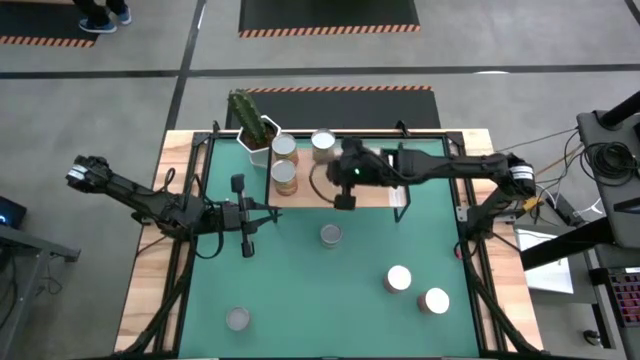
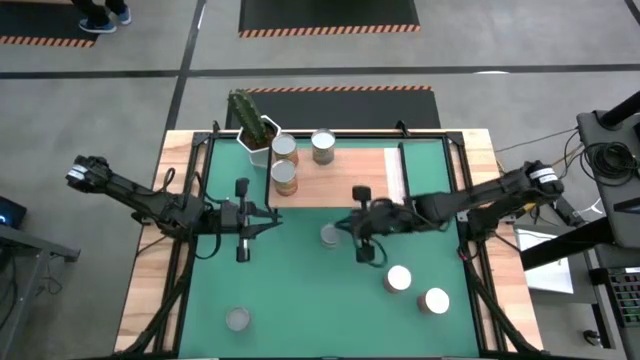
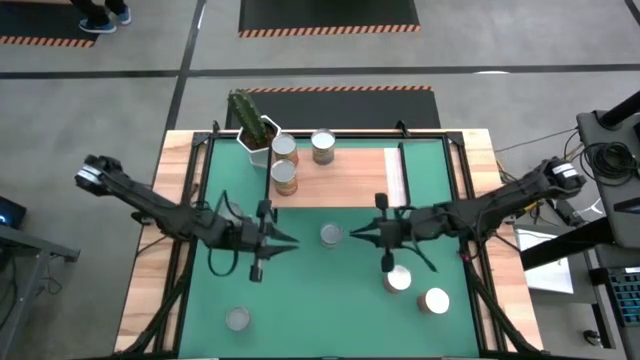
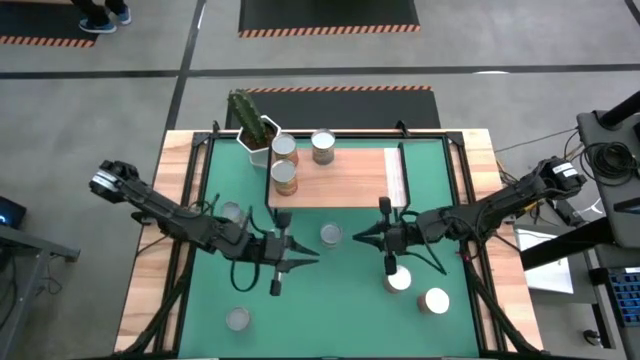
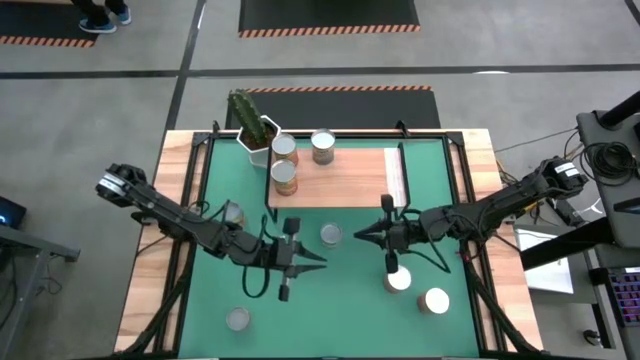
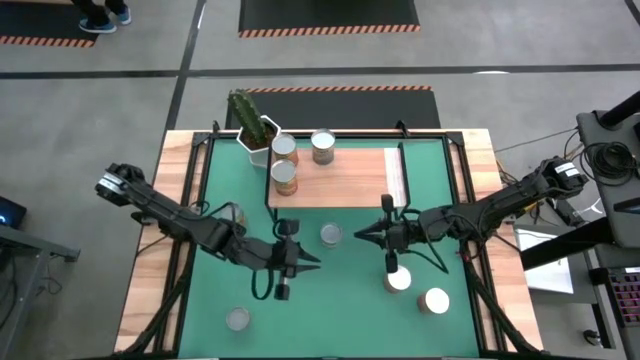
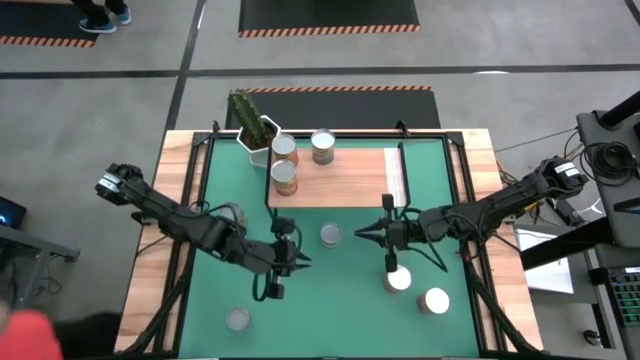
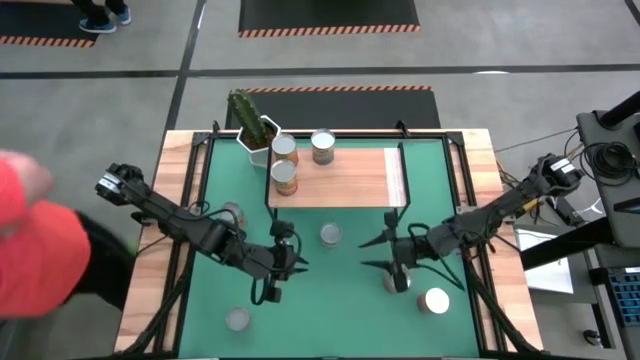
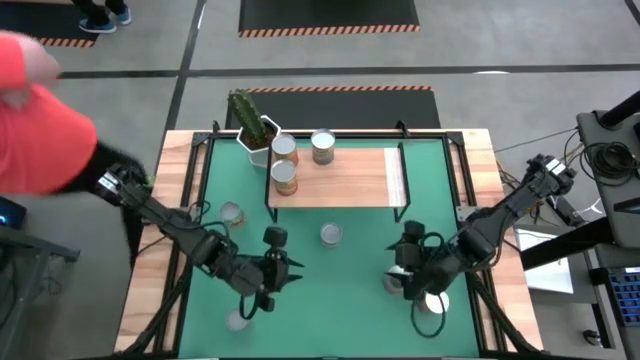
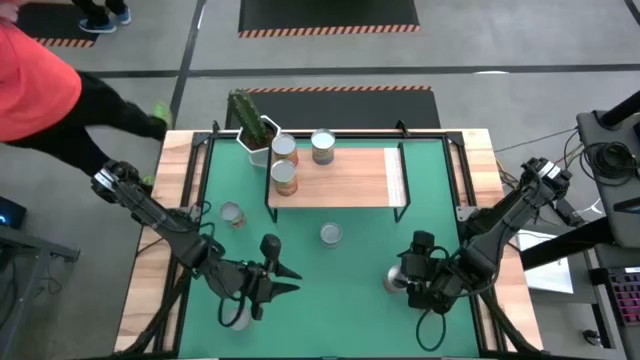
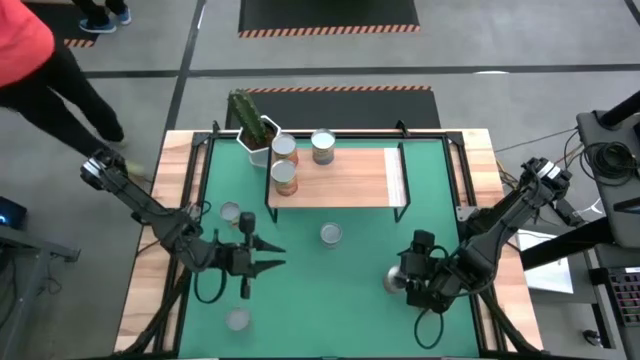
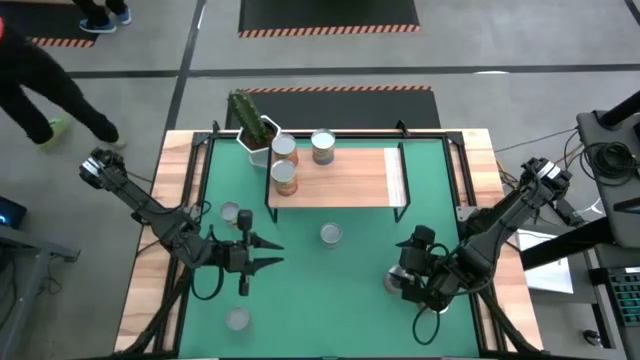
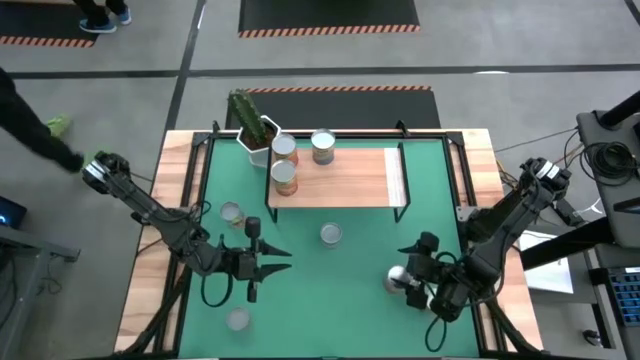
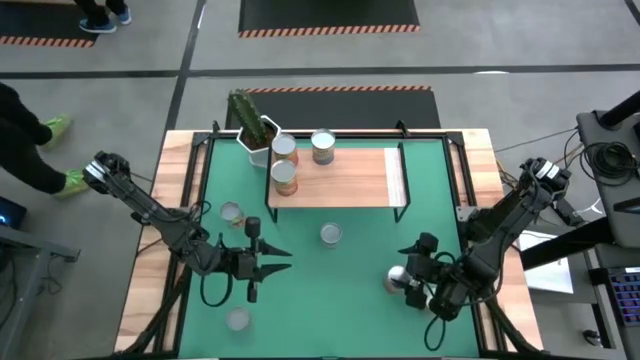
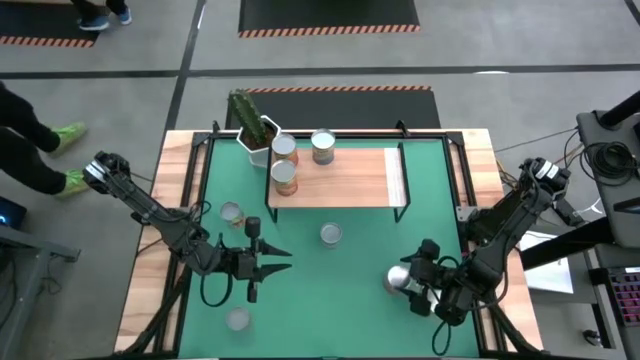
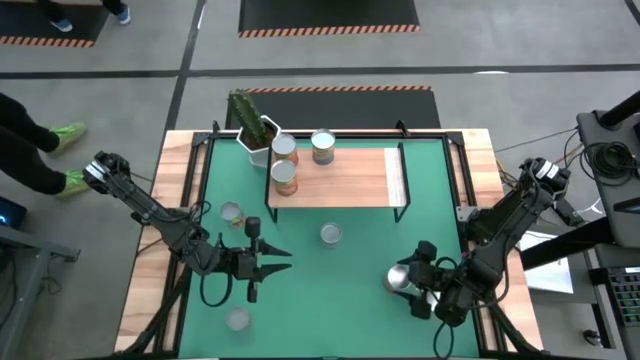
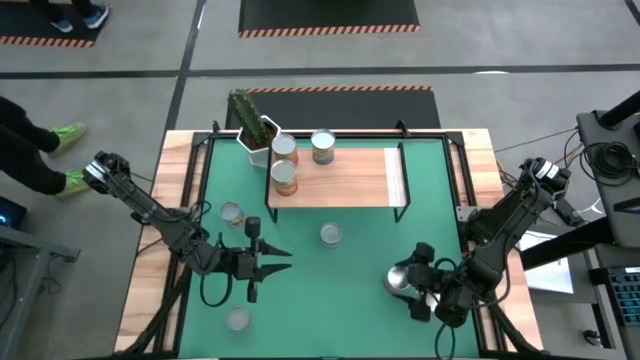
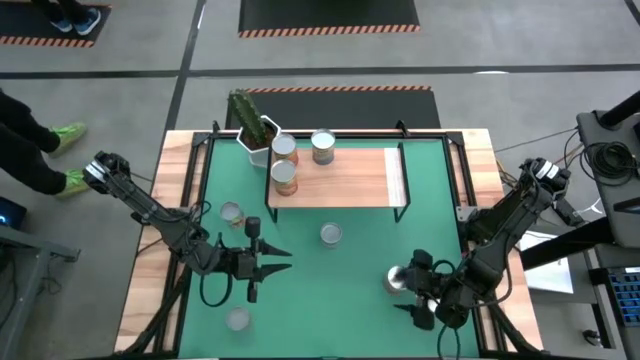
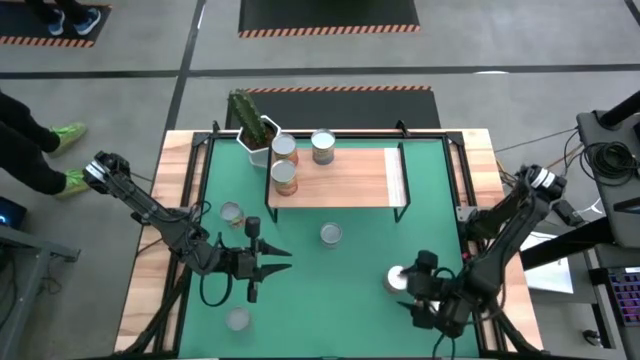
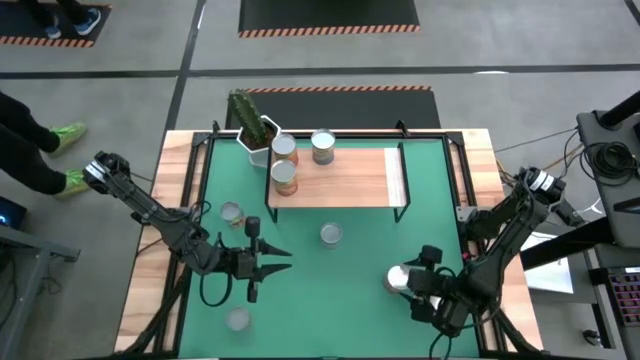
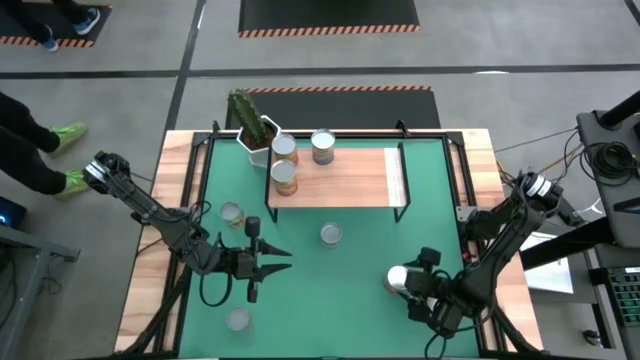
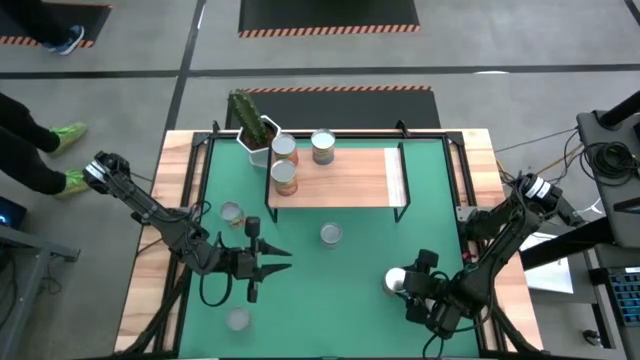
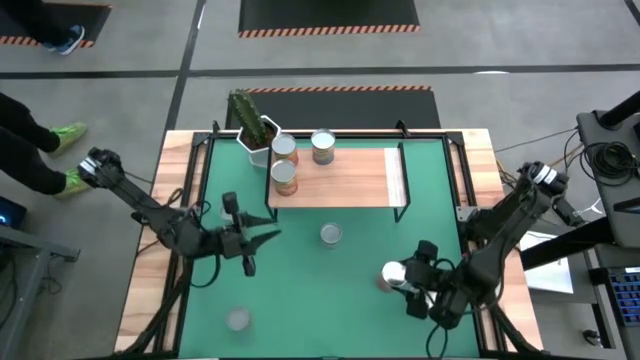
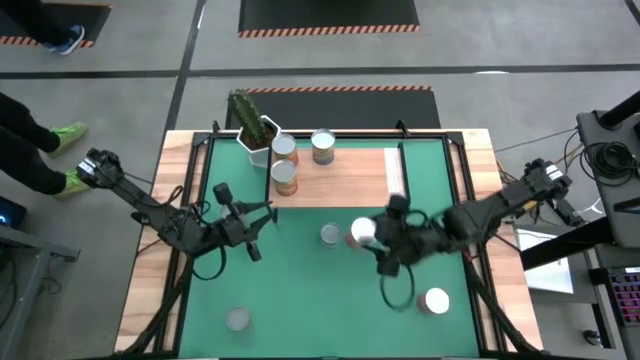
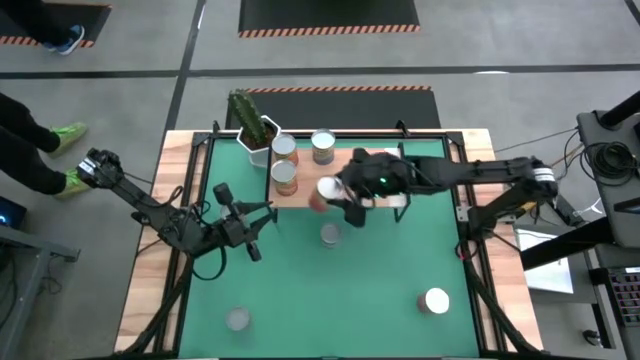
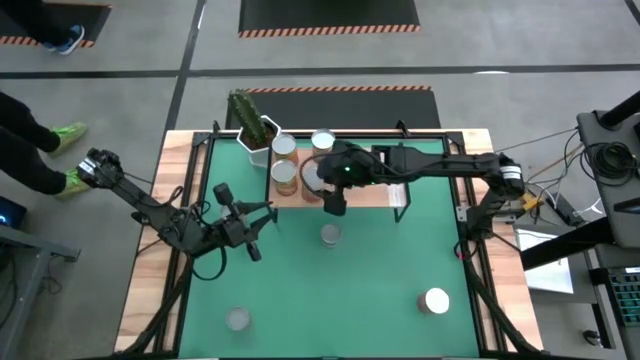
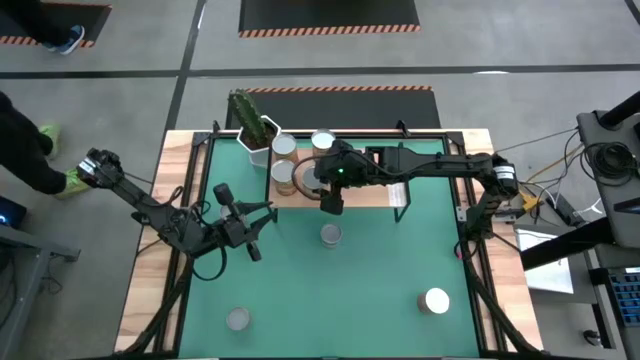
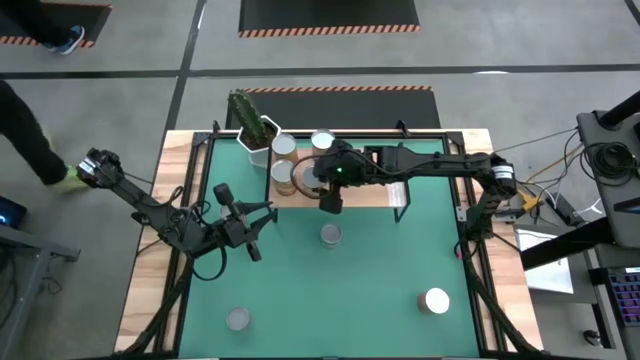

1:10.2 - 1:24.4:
Task: Pick and place cans onto a shelf
Put the canned corn on the shelf

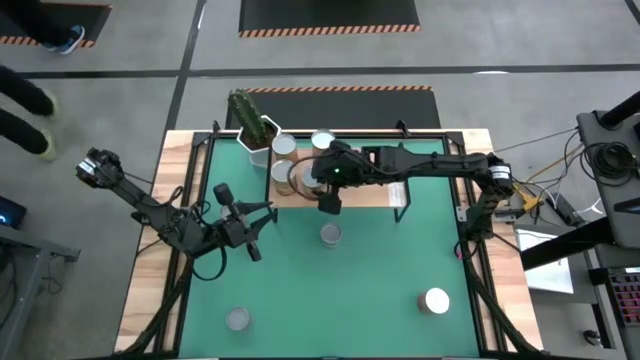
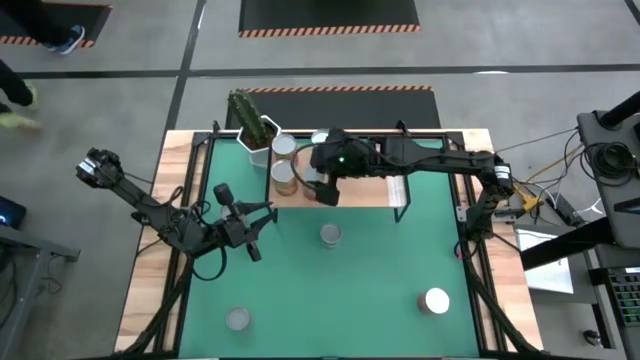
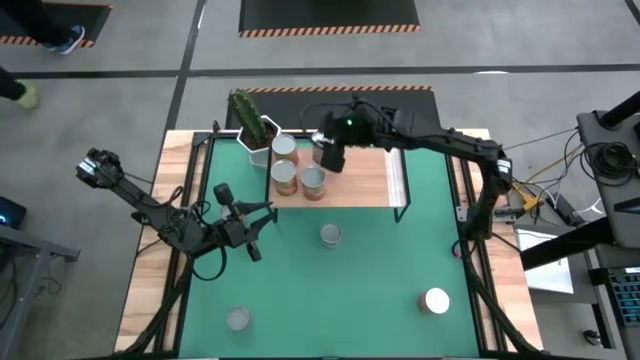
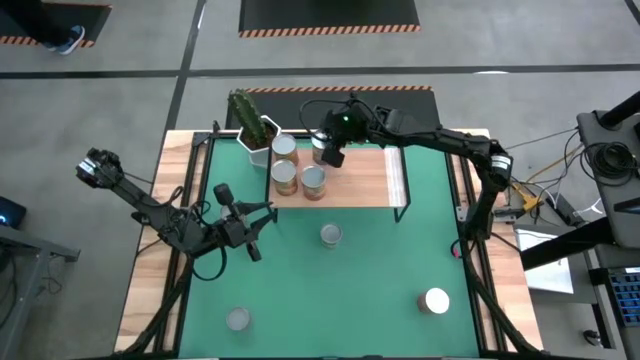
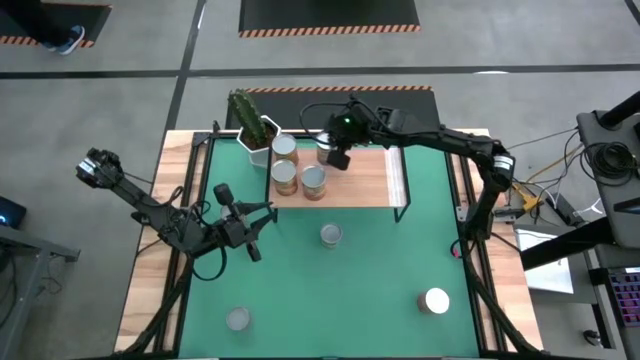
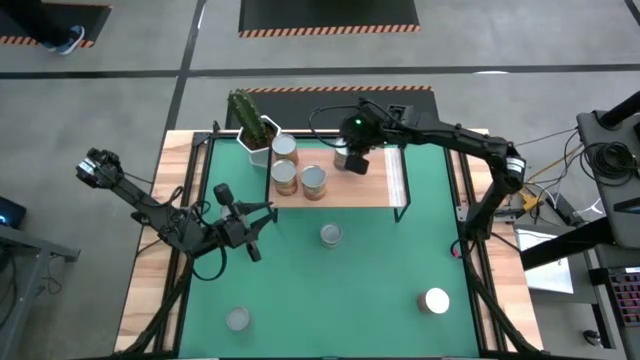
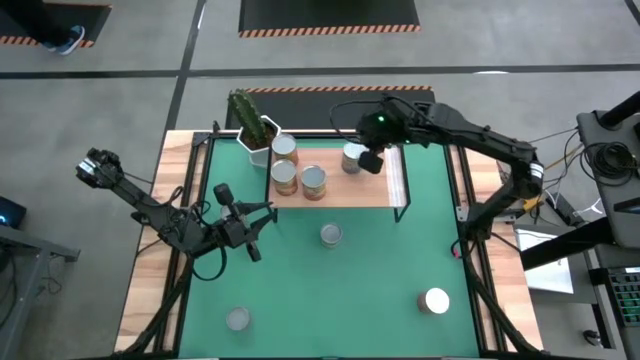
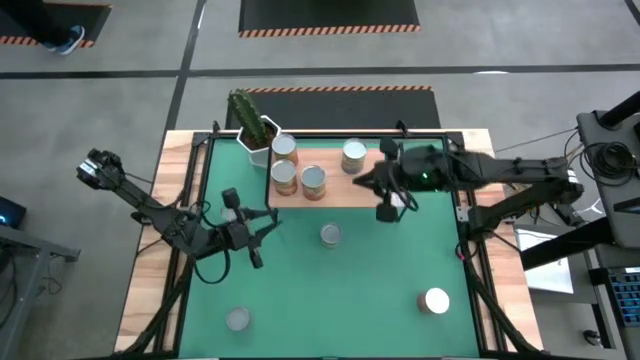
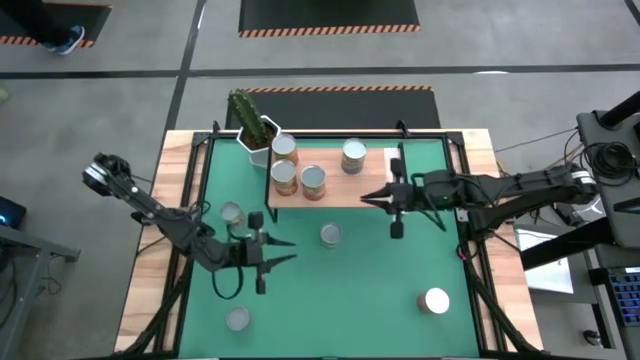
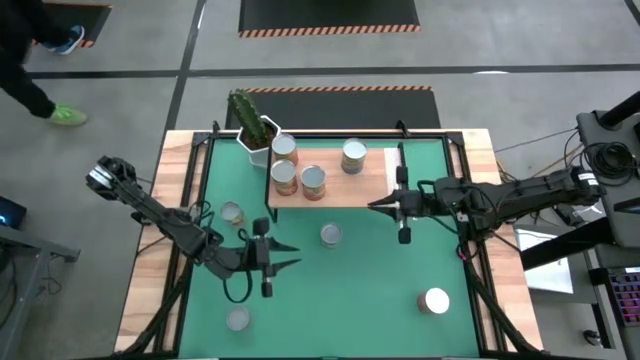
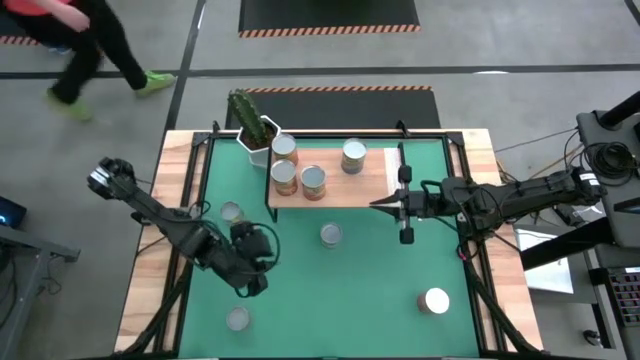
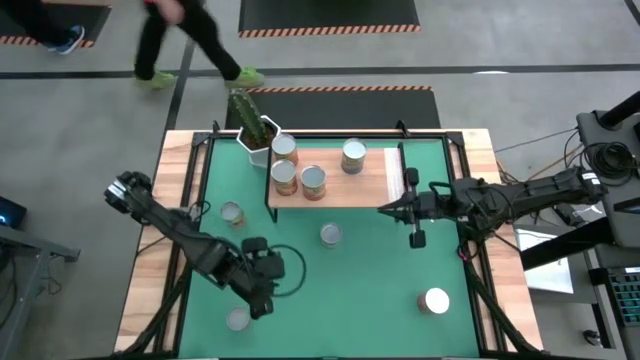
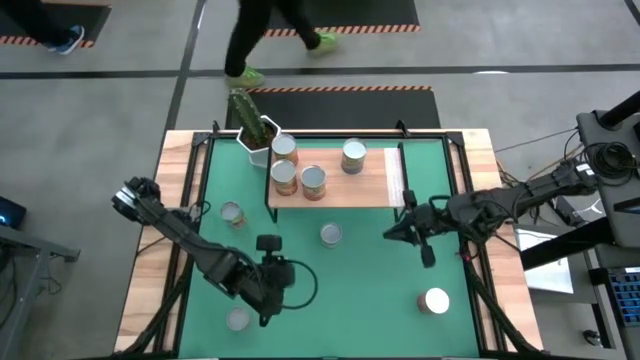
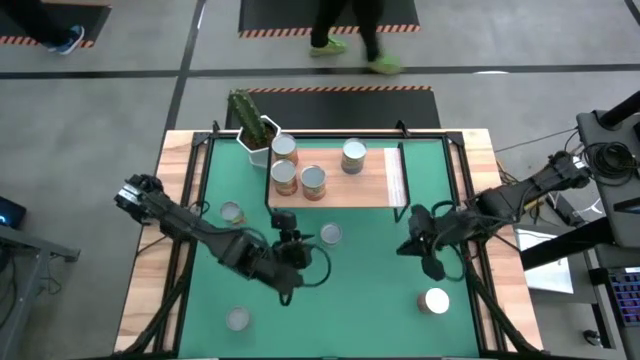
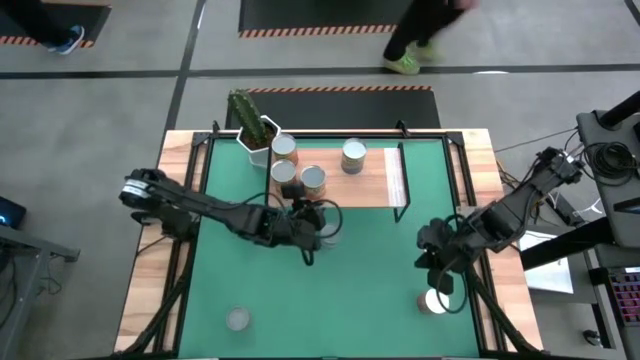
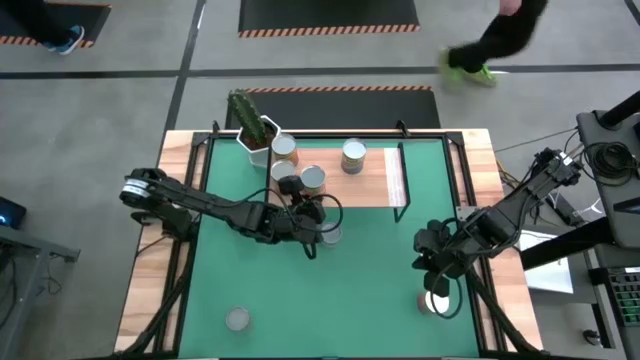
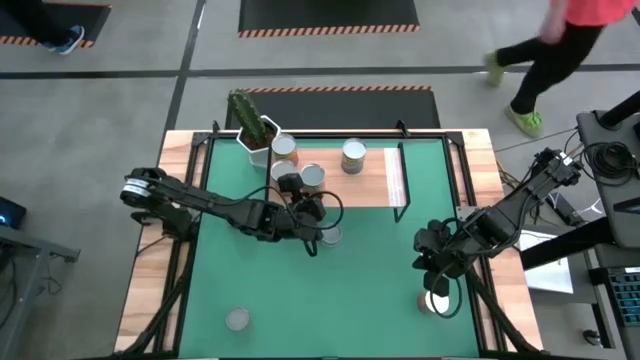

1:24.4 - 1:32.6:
Adjust the cans on the shelf
